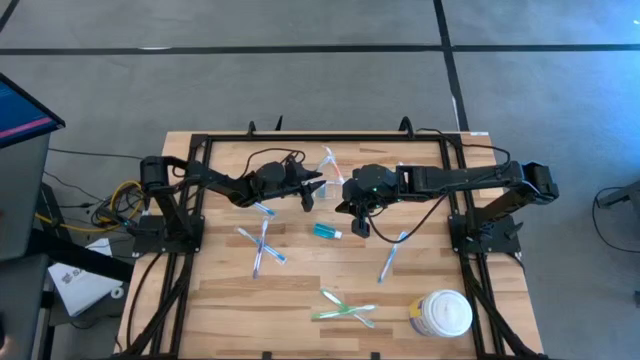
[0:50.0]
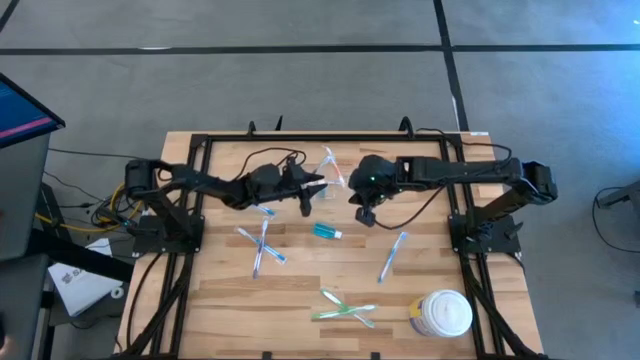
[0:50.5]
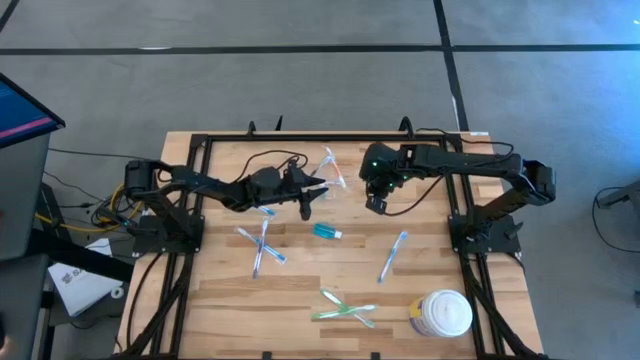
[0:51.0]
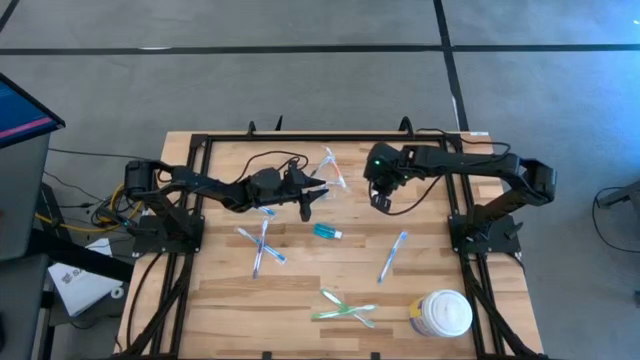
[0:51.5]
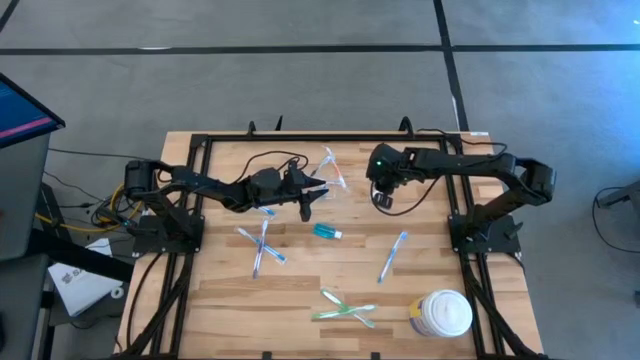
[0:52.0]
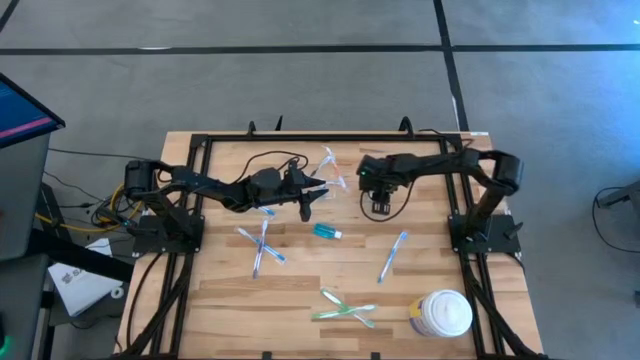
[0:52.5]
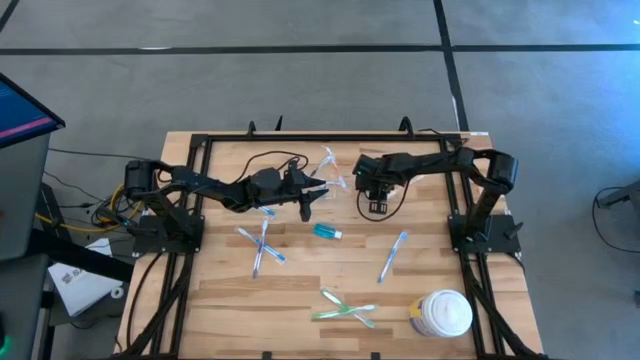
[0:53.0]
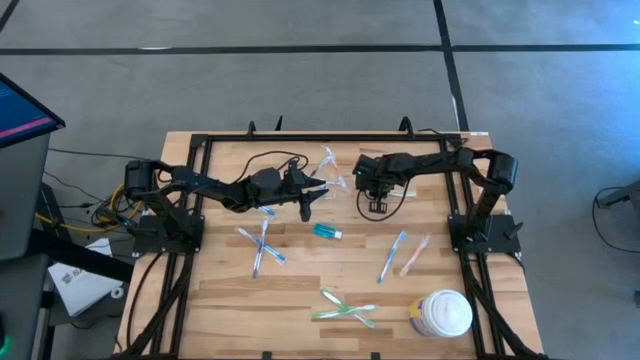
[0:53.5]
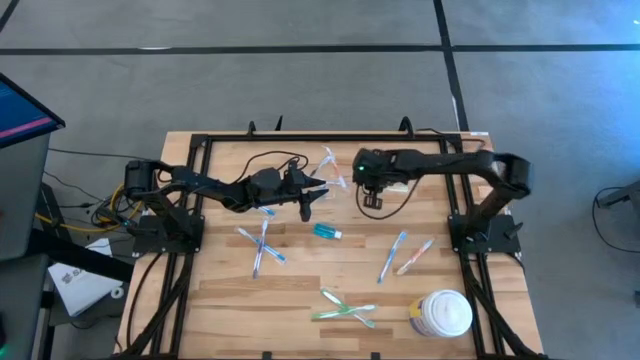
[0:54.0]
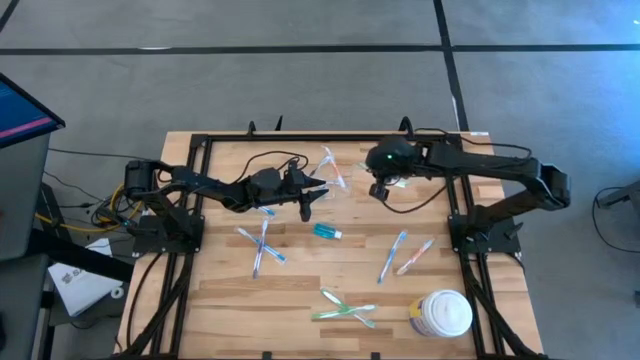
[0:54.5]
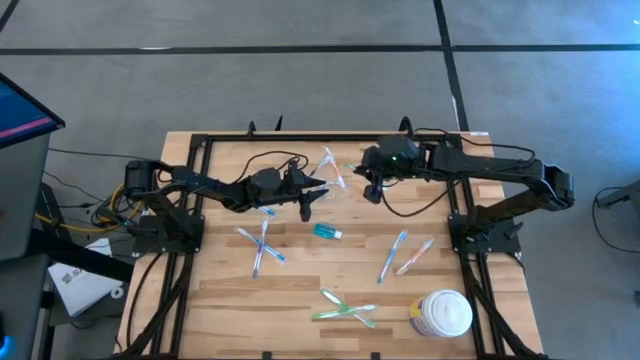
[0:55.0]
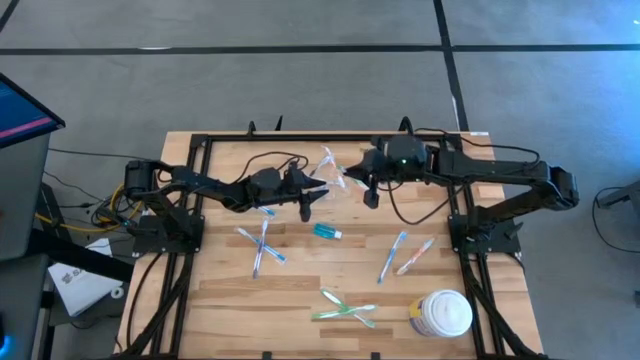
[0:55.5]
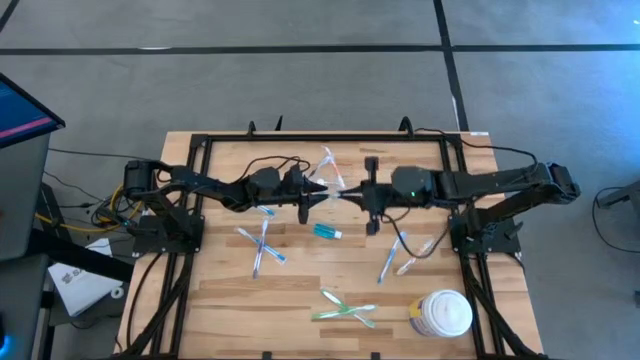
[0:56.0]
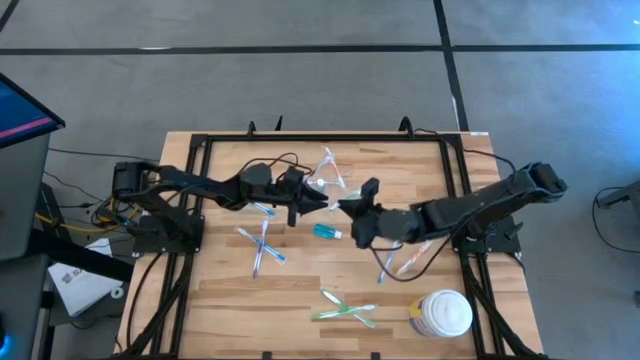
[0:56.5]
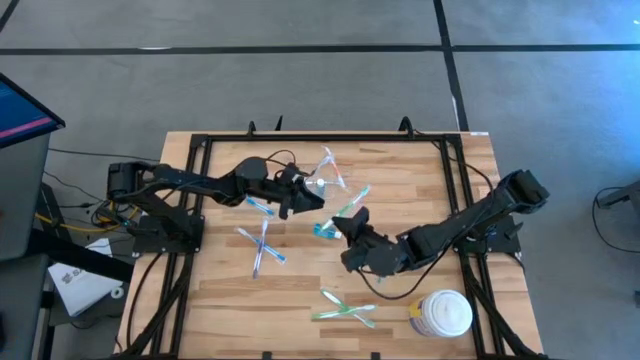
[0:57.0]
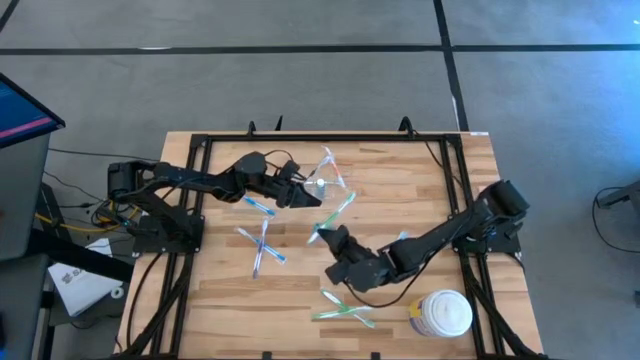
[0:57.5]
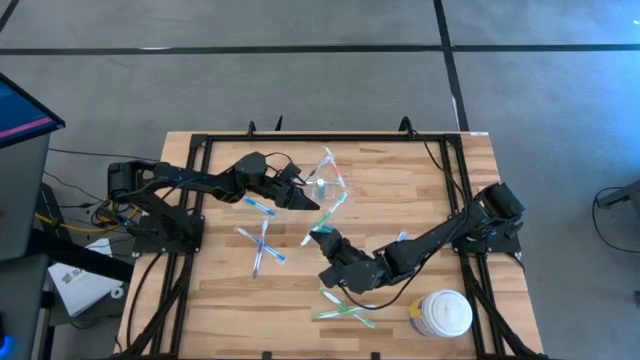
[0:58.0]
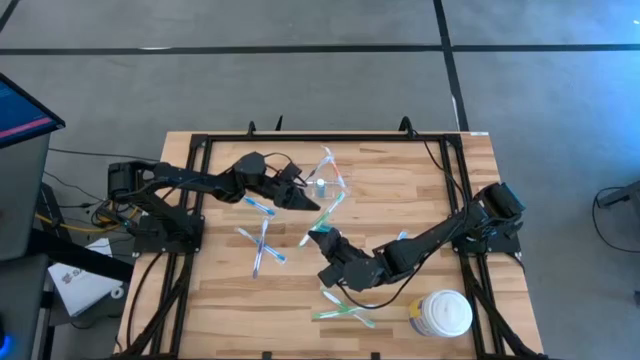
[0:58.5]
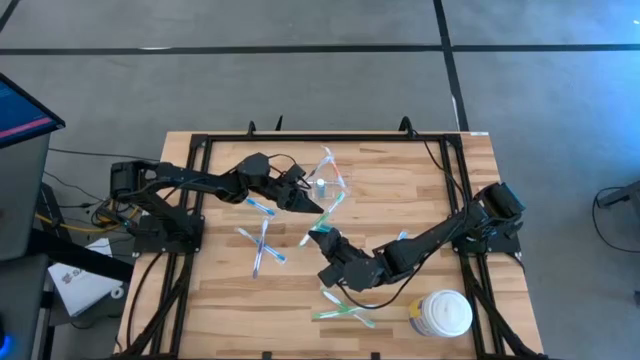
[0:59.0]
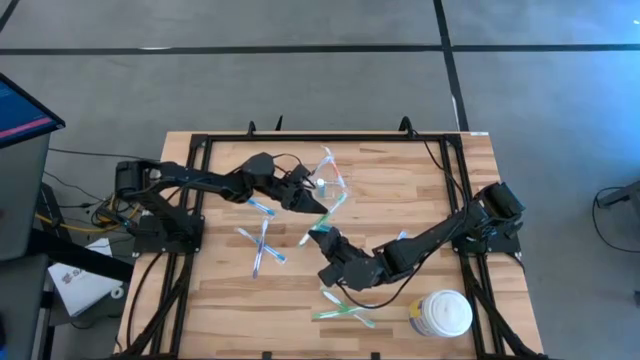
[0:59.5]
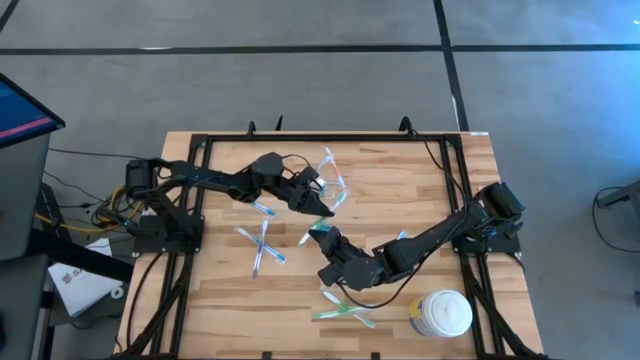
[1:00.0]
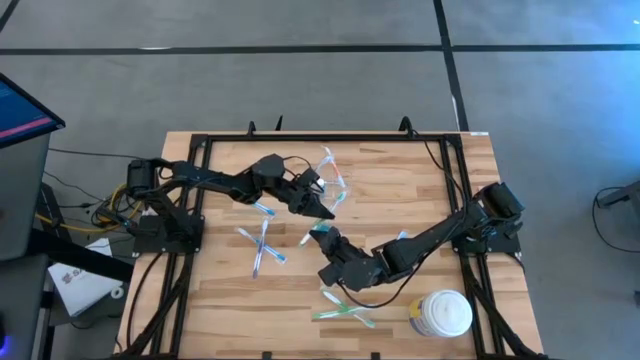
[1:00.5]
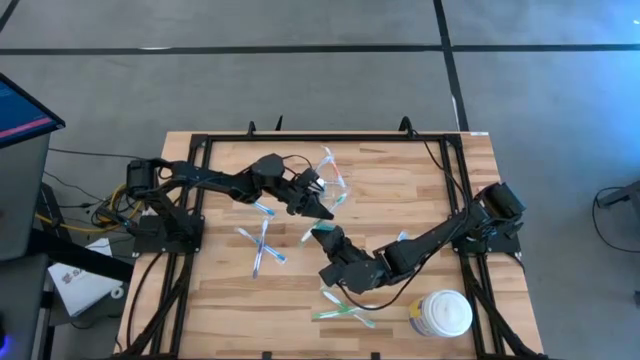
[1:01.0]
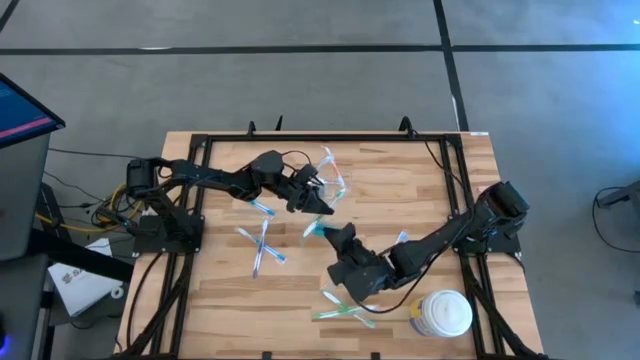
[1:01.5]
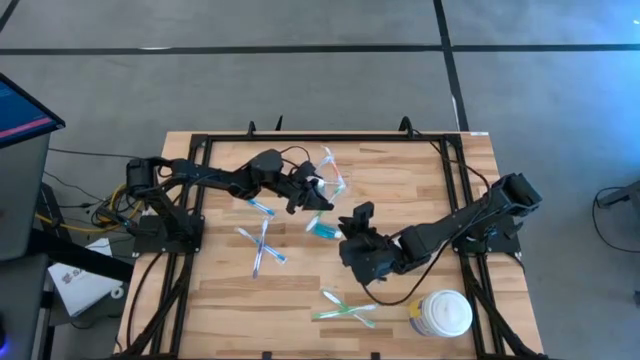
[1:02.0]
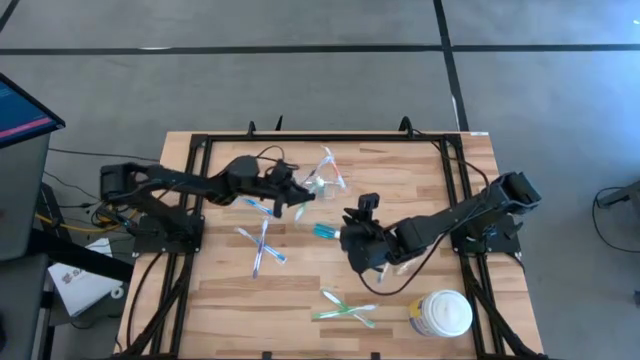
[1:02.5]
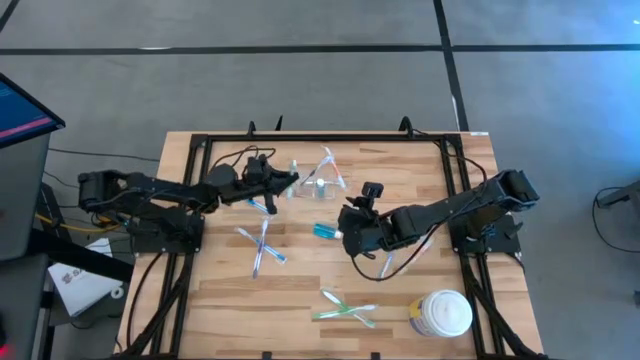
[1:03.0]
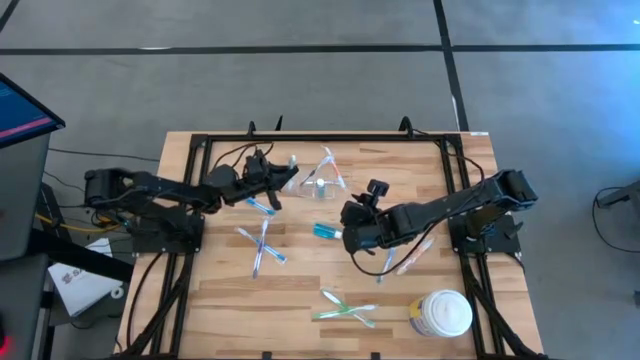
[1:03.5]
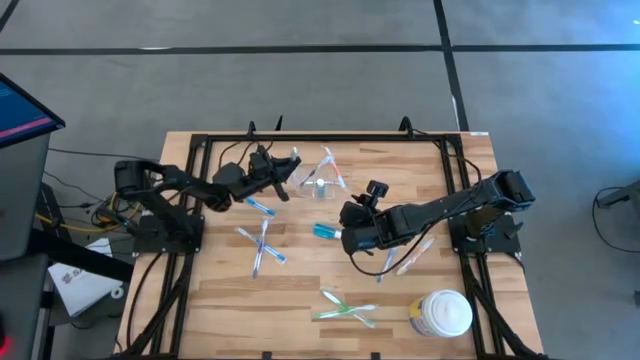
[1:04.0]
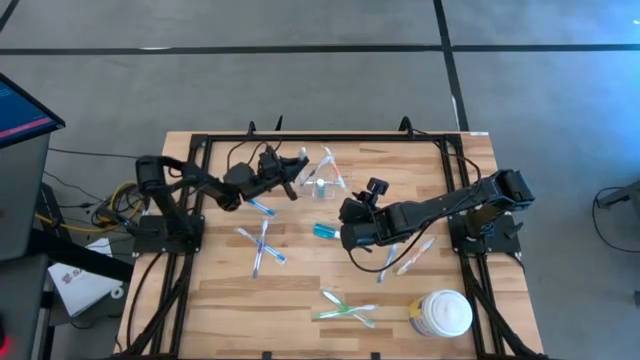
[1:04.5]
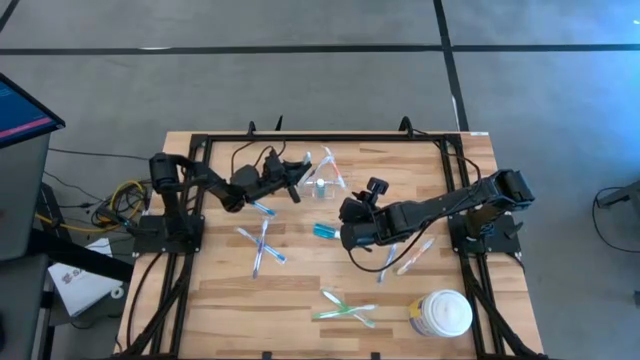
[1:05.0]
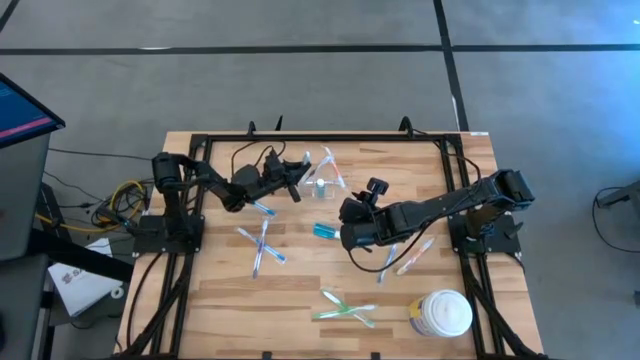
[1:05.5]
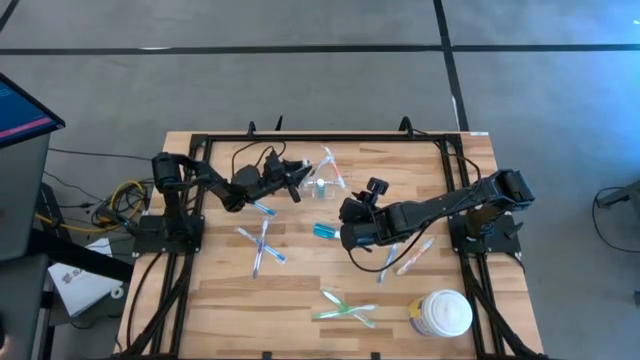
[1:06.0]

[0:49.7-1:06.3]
Task: Pick & Place toothbrushing station
Put the top green toothbrush into the transparent organizer
